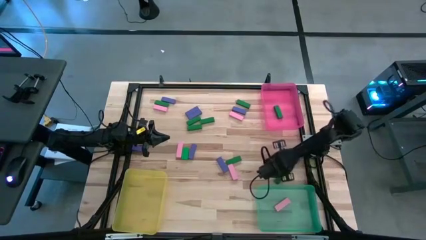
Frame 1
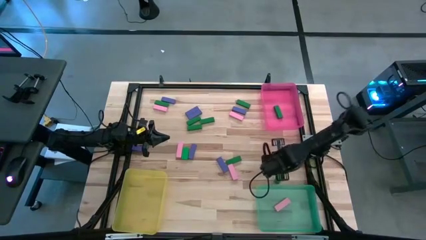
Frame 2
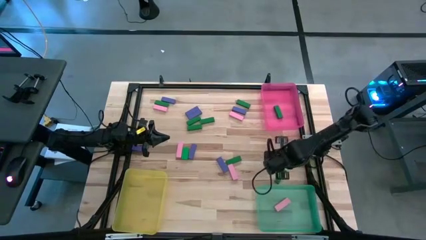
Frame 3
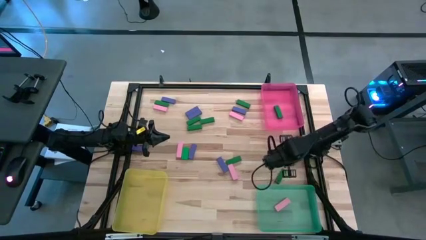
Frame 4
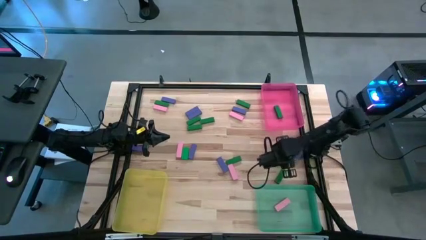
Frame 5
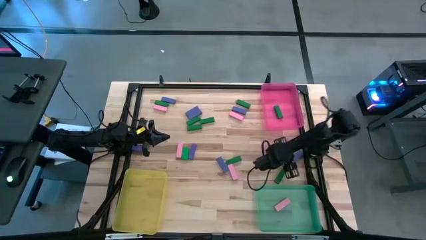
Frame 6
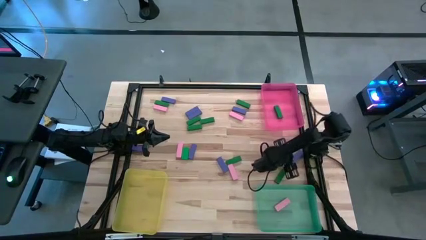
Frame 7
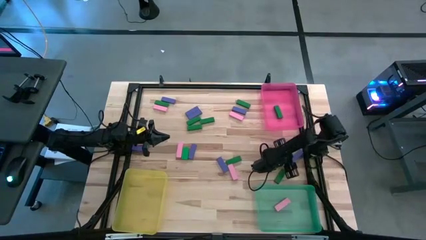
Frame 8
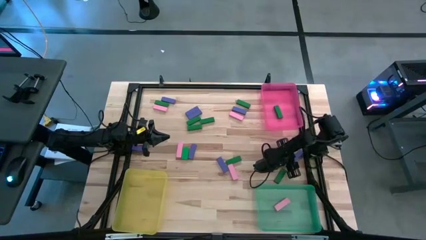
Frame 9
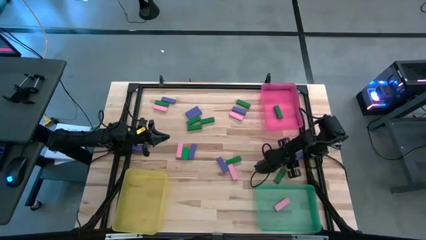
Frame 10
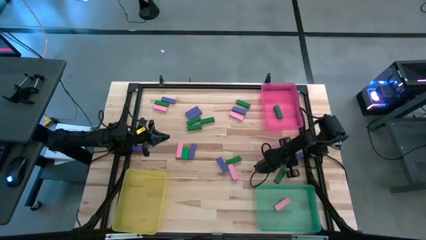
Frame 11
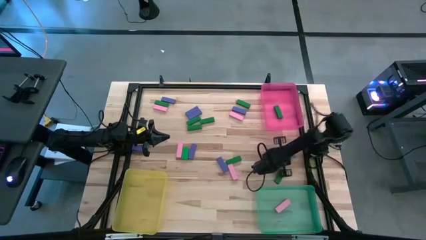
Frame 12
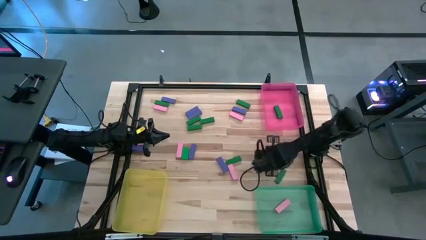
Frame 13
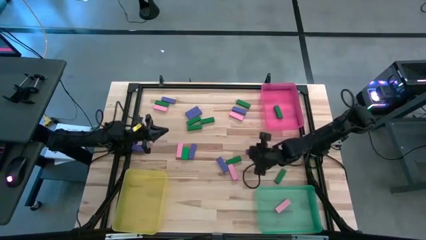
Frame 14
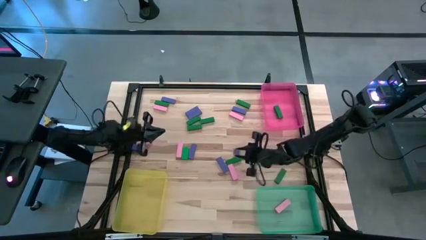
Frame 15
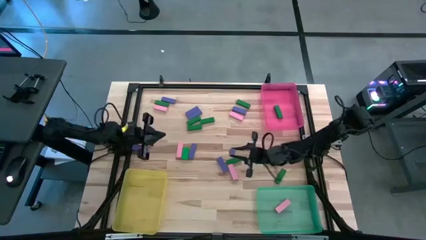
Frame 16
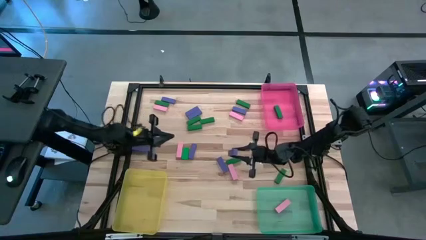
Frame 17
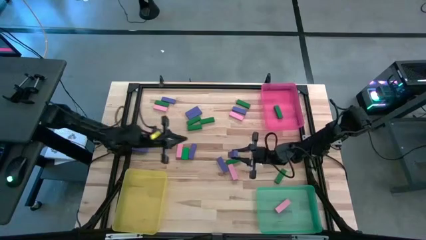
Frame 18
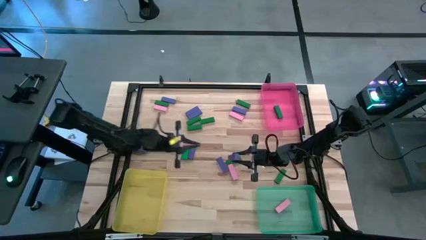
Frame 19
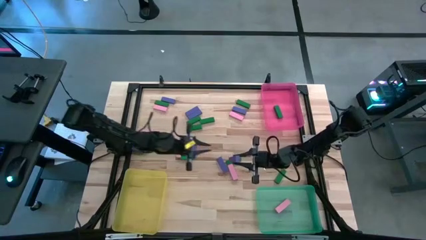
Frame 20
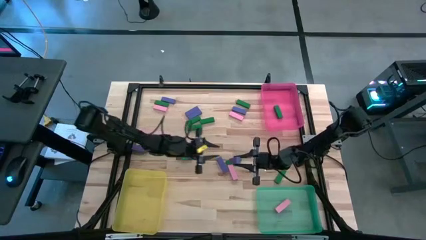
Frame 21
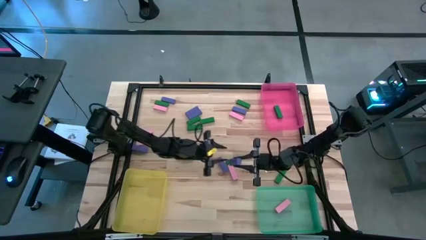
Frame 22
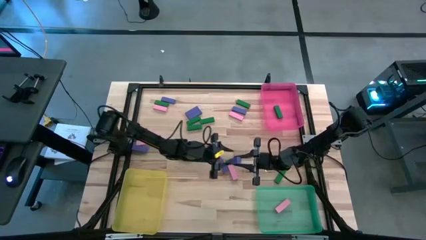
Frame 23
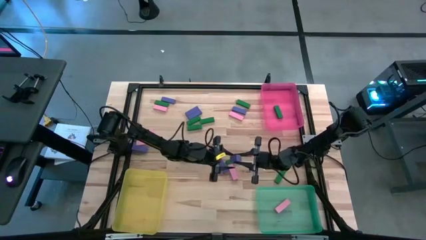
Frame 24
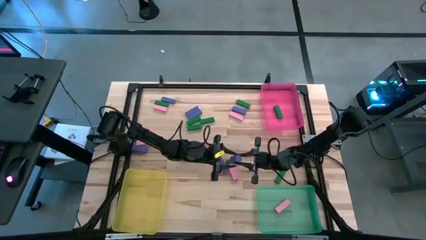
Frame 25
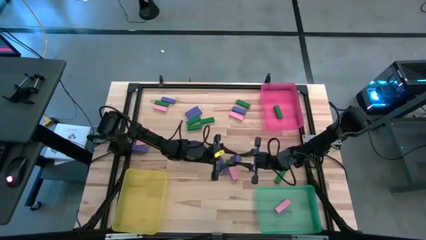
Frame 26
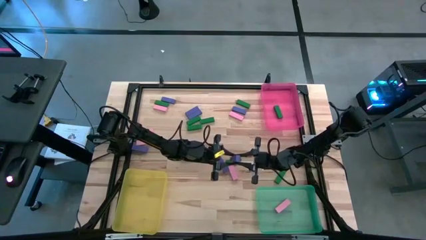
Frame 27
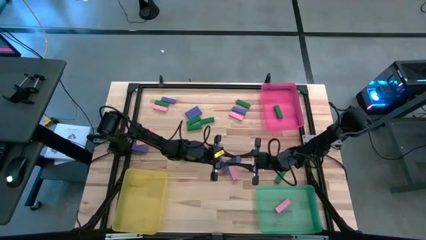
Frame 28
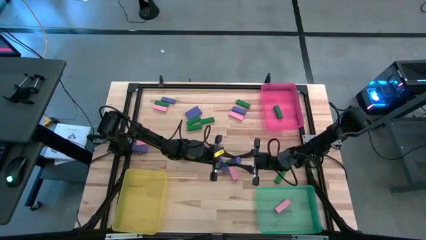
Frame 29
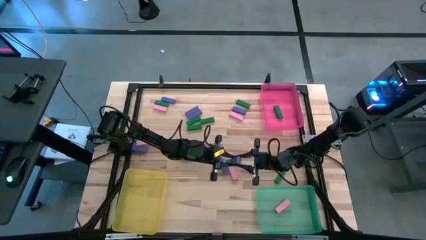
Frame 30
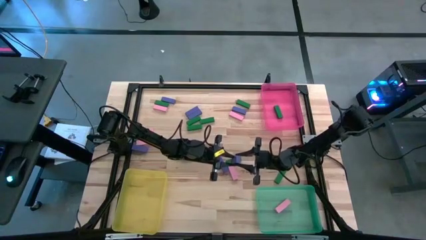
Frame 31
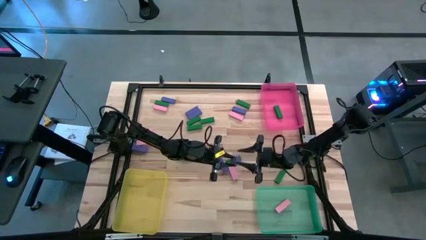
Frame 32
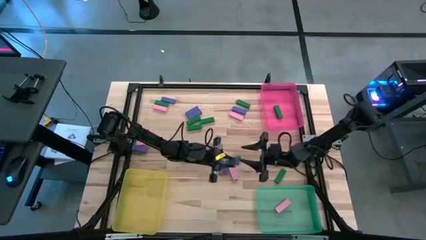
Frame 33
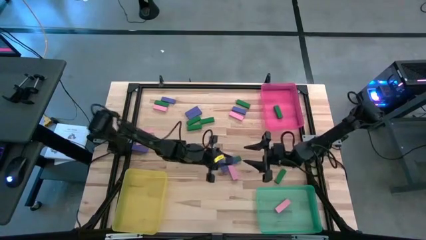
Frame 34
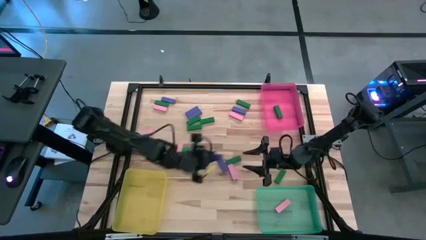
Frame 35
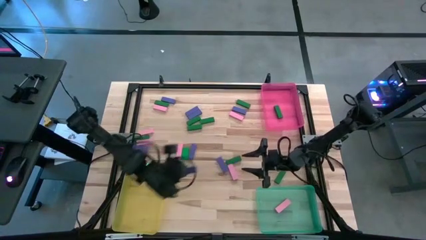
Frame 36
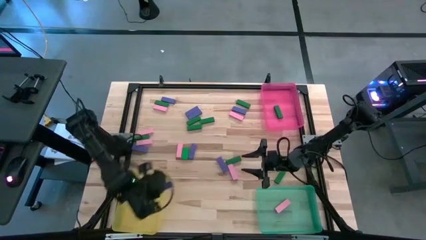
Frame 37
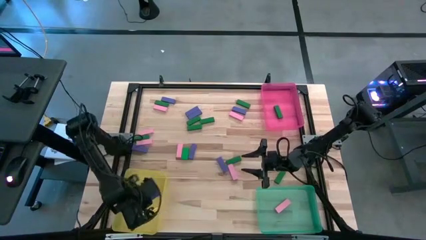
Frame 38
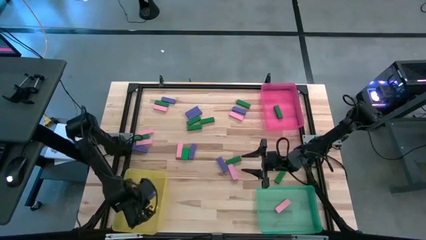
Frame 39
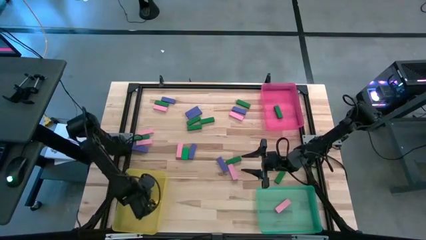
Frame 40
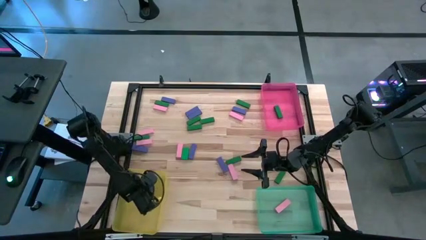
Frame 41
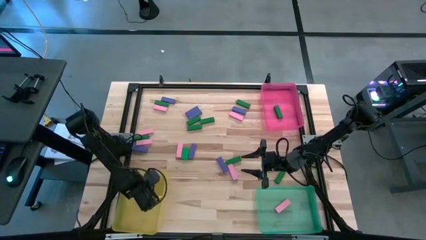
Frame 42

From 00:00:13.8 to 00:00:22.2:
Task: Sort blocks
Put the blue block into the yellow bin

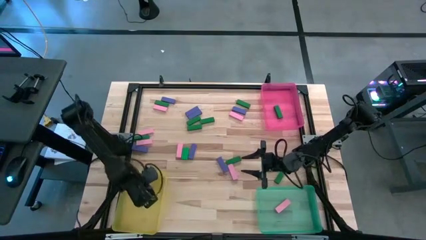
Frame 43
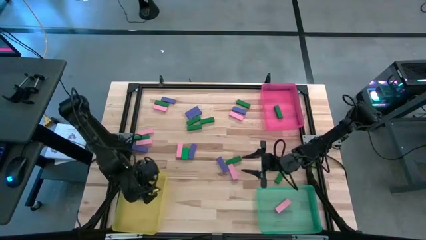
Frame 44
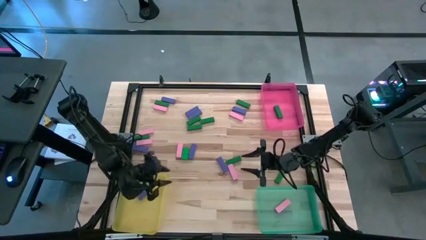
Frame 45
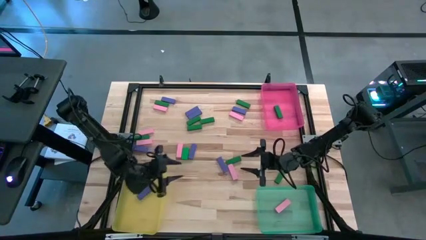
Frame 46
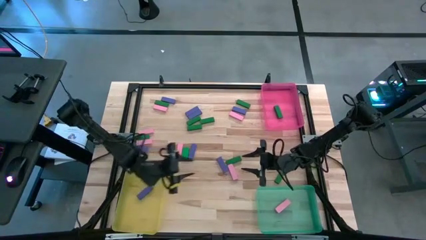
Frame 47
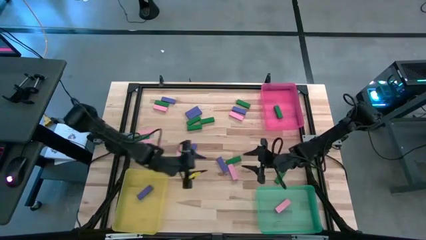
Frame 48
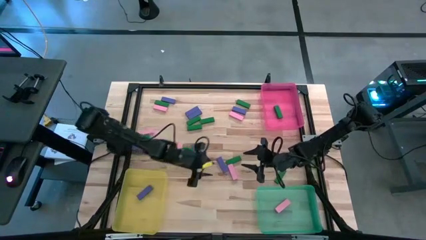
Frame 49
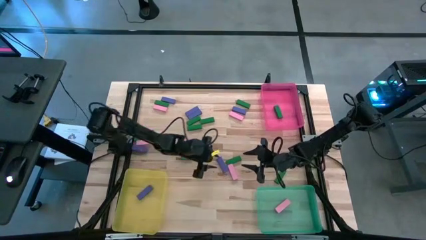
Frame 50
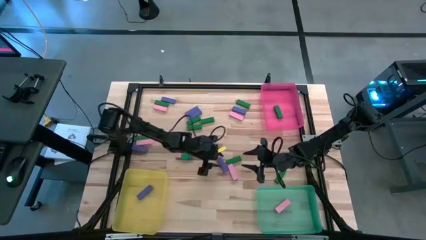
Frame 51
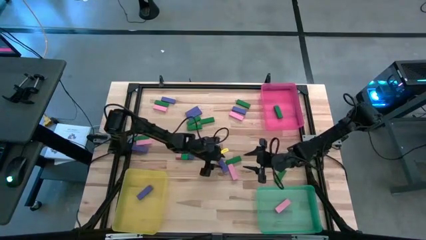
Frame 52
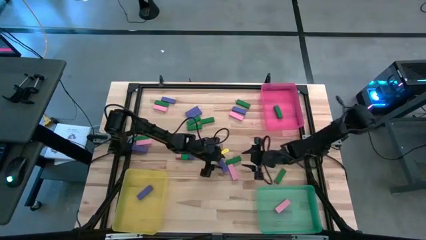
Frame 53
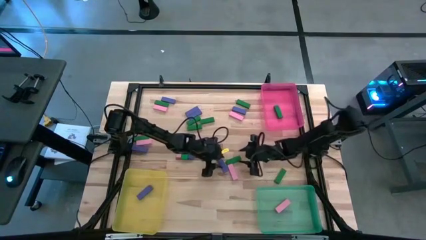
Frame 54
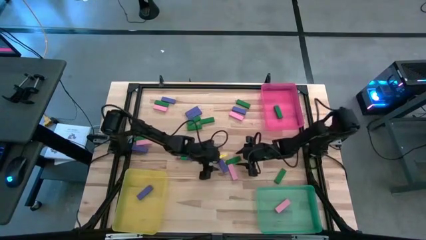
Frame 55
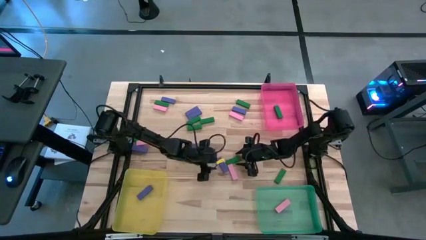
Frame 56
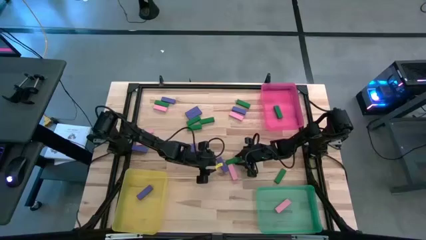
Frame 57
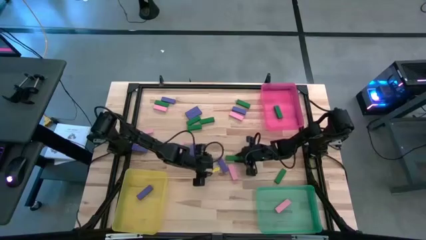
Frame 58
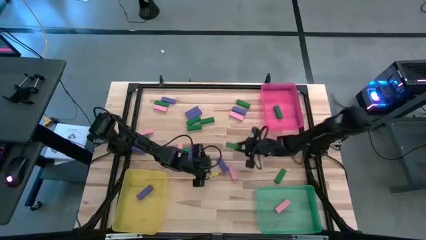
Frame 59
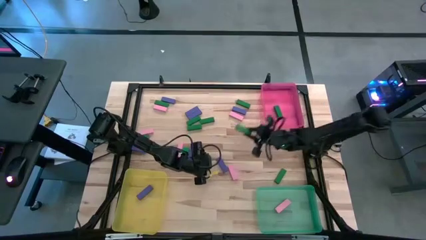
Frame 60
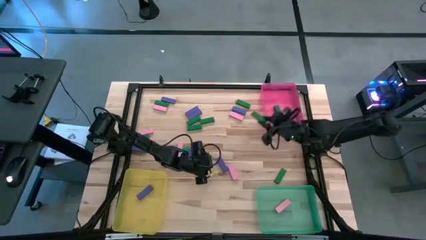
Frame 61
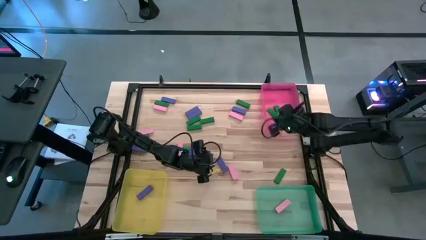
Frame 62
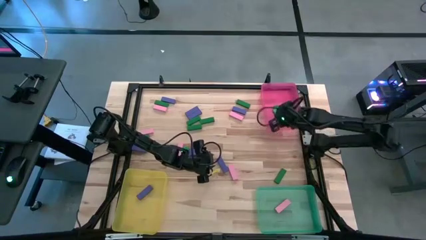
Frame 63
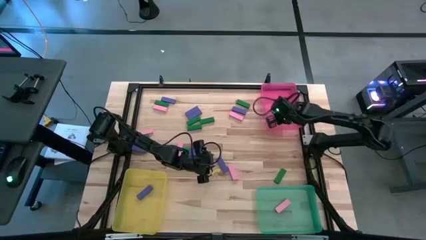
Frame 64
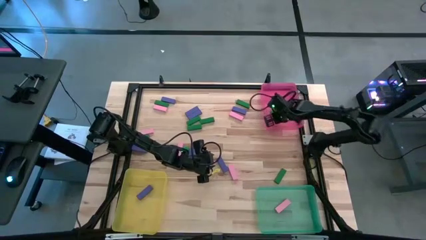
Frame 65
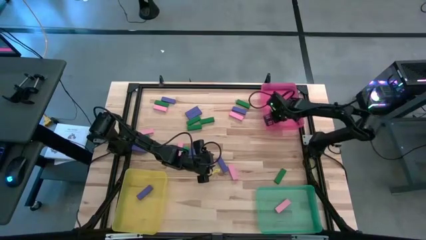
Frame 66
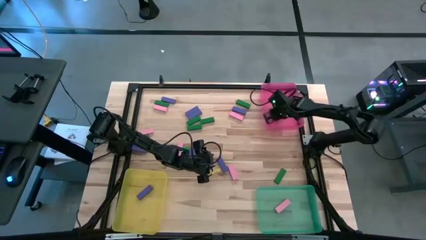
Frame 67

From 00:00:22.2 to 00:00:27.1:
Put the green block into the pink bin

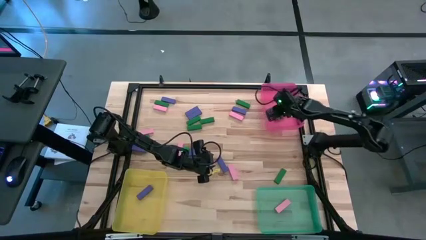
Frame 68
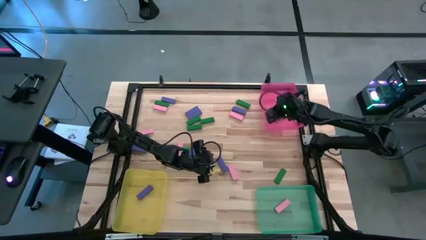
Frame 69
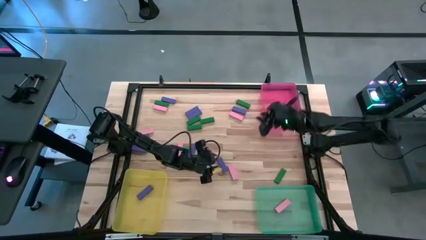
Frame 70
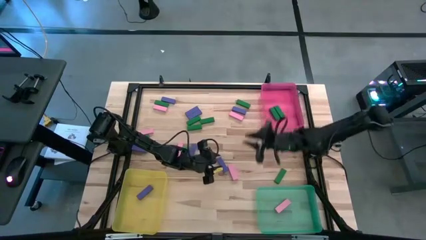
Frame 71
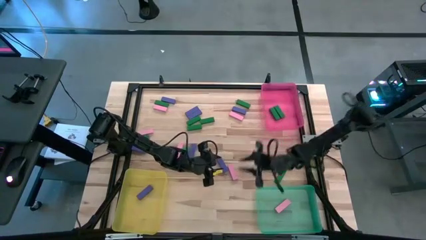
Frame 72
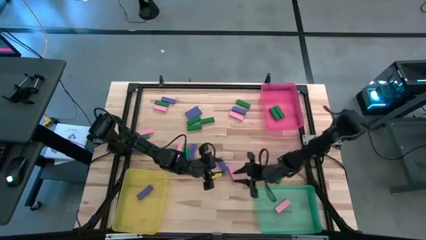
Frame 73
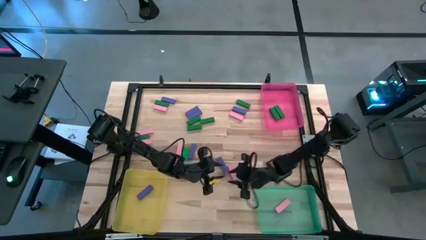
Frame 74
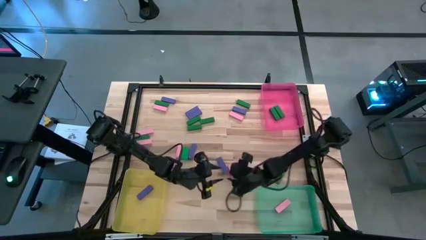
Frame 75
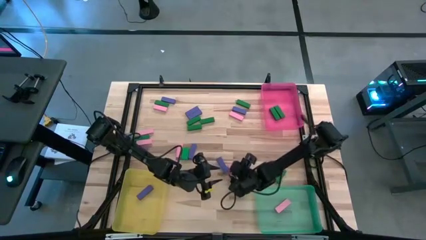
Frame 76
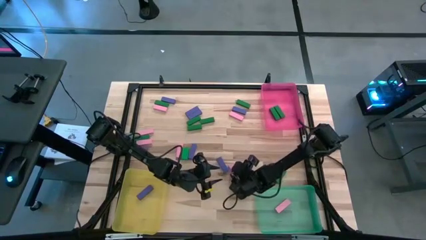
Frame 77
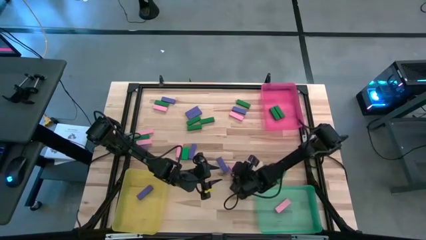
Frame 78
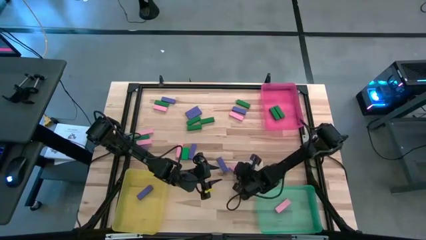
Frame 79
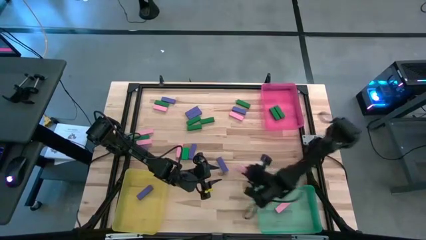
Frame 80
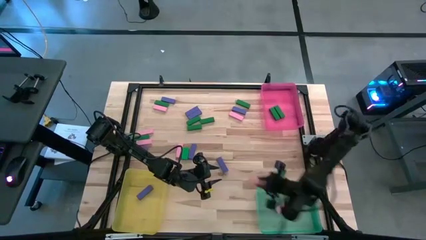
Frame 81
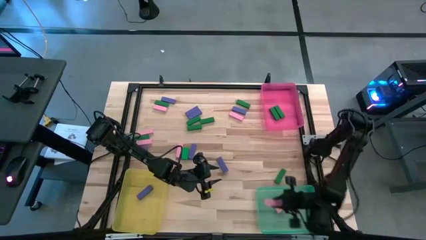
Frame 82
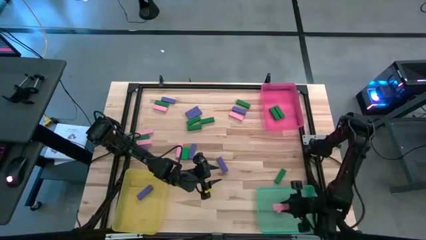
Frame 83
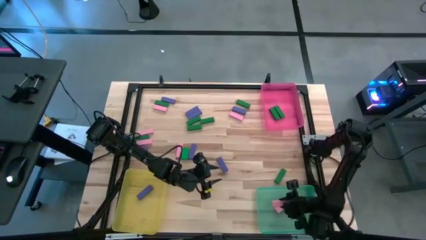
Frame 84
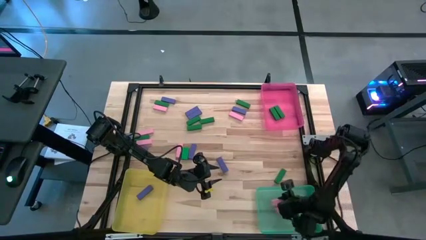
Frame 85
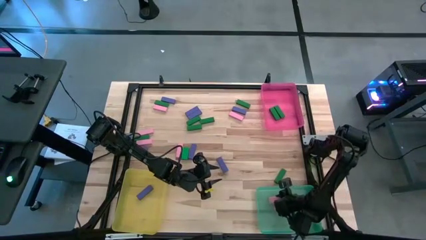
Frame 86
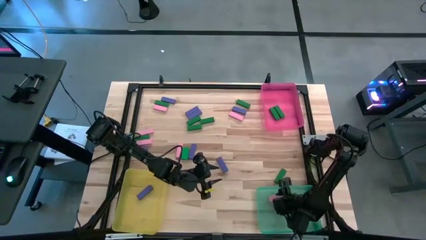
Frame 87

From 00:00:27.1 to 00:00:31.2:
Put the pink block into the green bin
